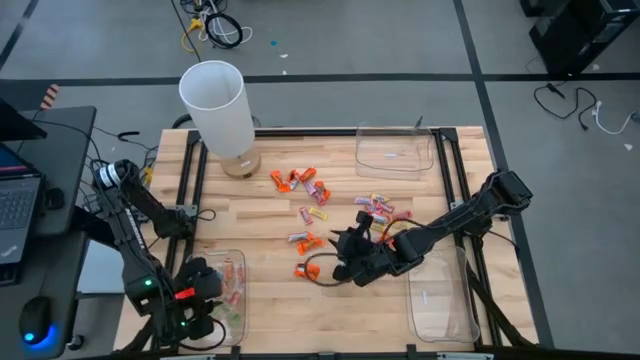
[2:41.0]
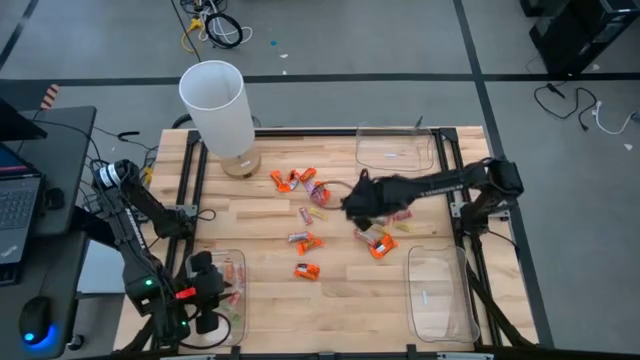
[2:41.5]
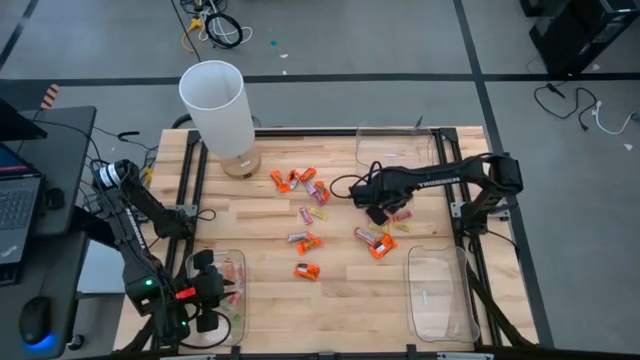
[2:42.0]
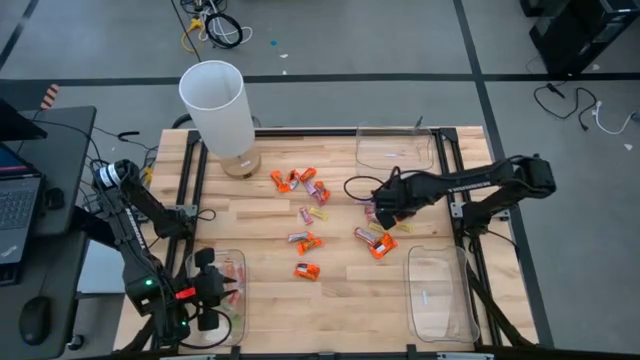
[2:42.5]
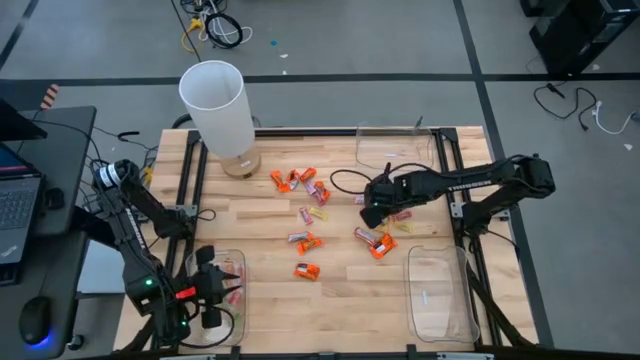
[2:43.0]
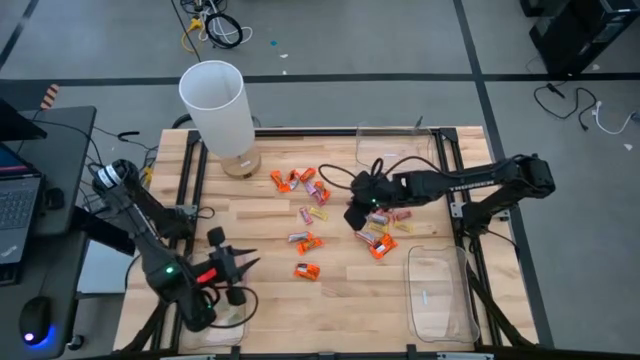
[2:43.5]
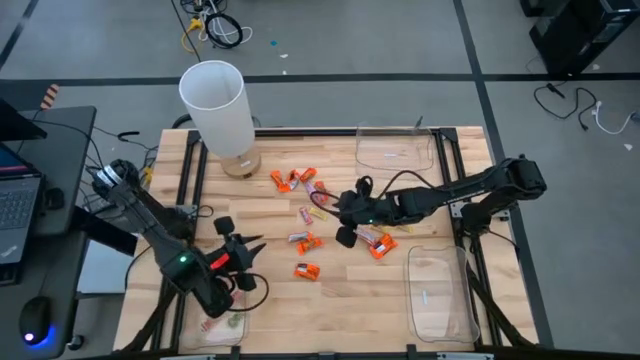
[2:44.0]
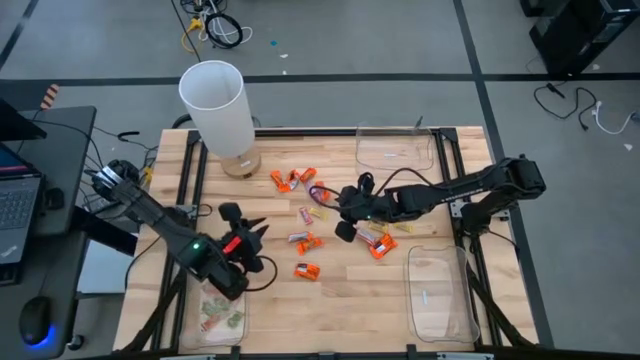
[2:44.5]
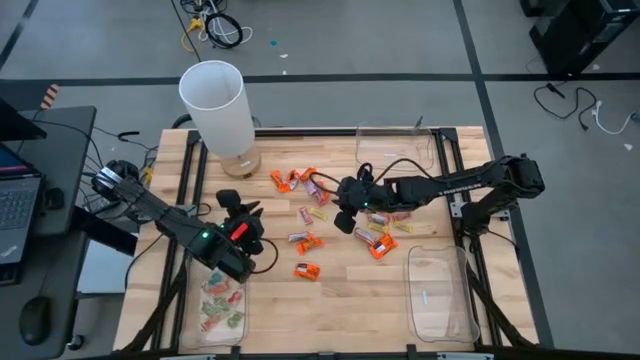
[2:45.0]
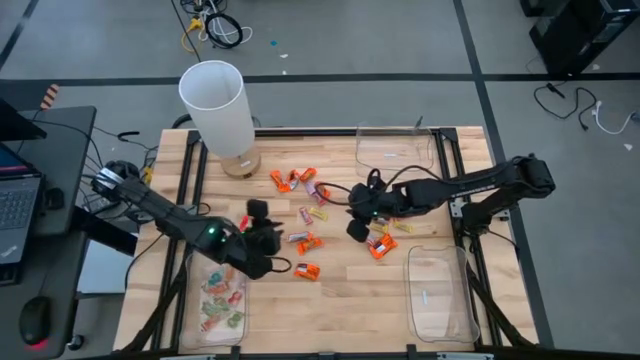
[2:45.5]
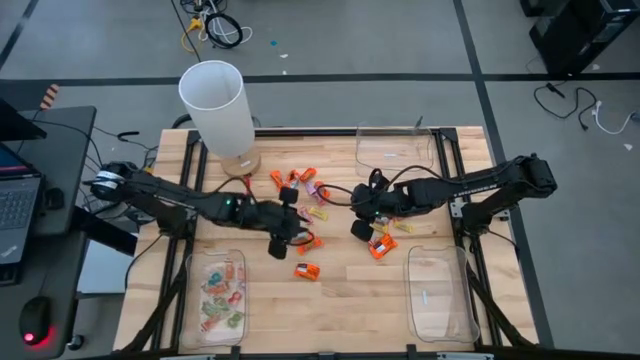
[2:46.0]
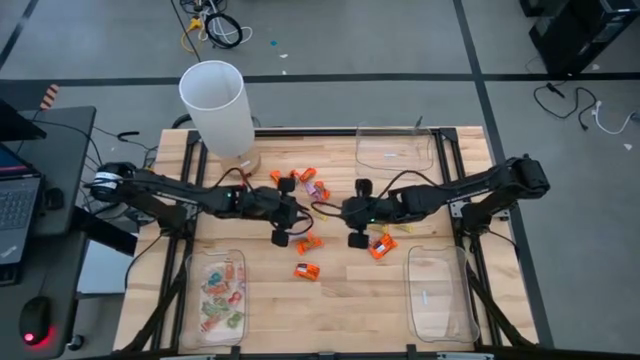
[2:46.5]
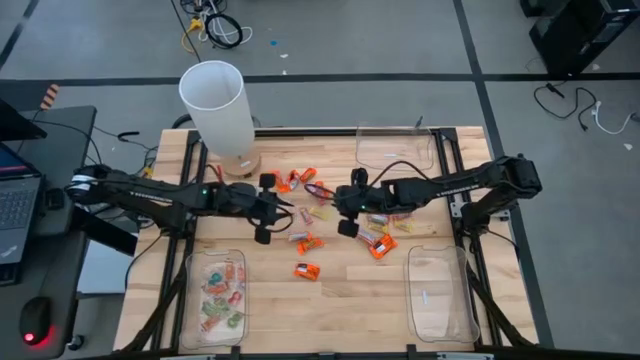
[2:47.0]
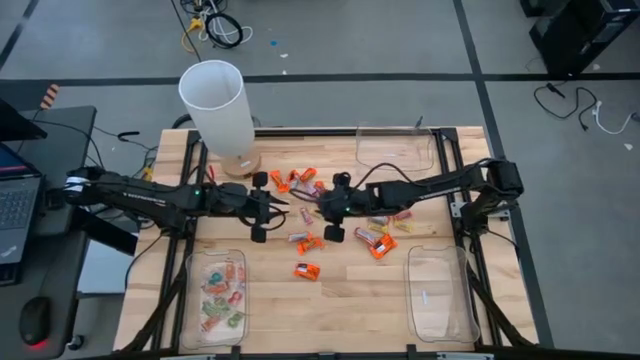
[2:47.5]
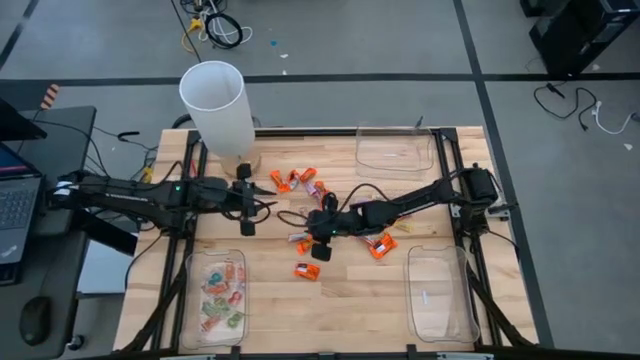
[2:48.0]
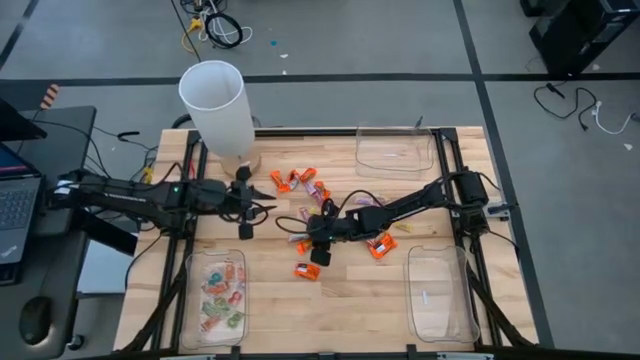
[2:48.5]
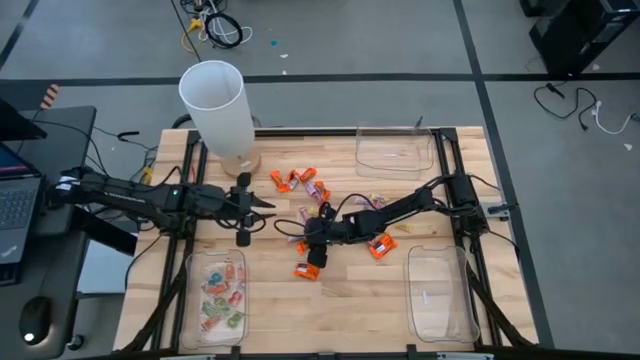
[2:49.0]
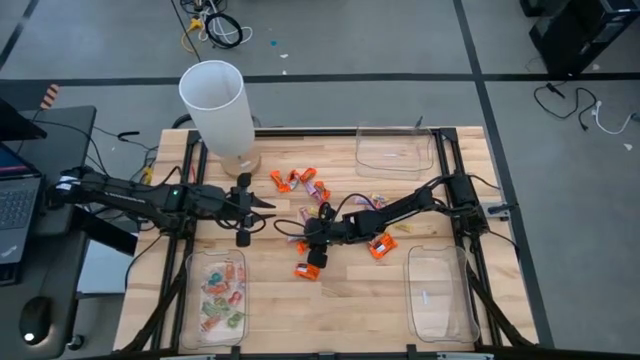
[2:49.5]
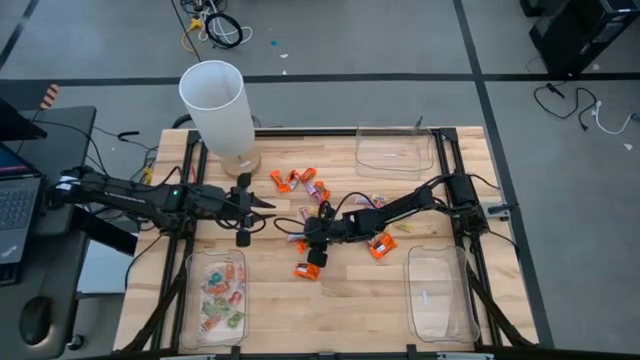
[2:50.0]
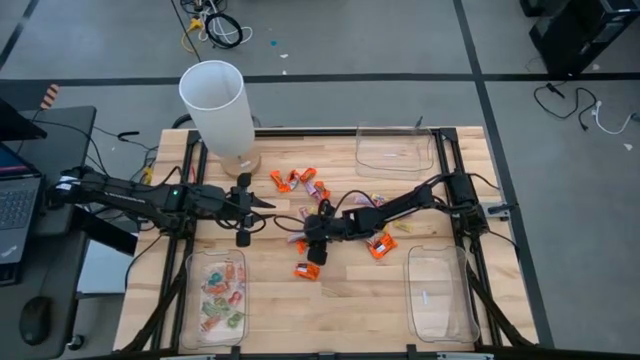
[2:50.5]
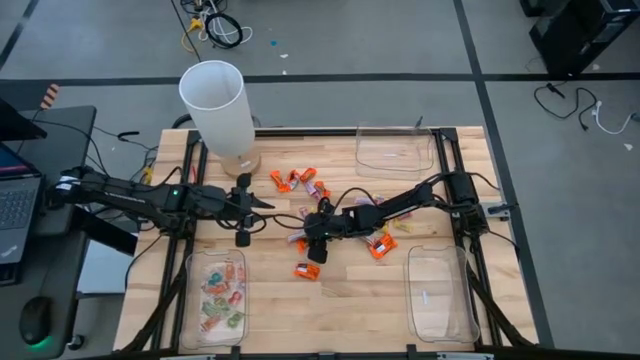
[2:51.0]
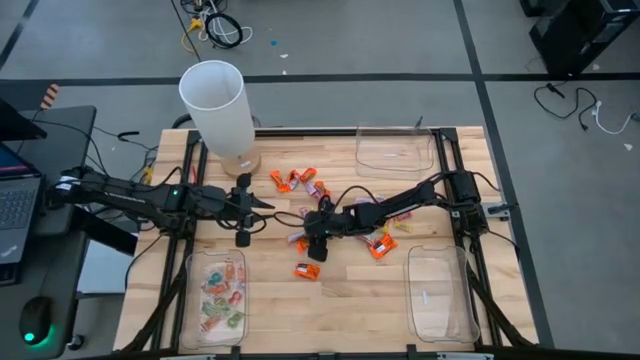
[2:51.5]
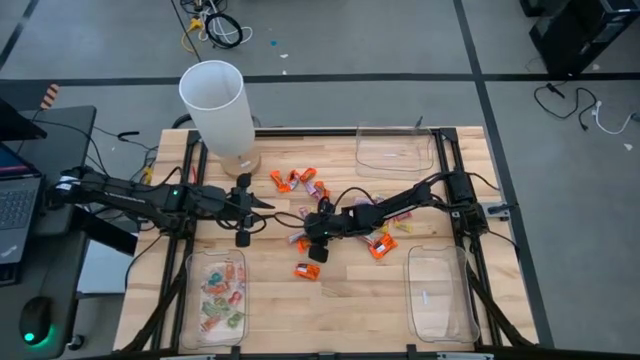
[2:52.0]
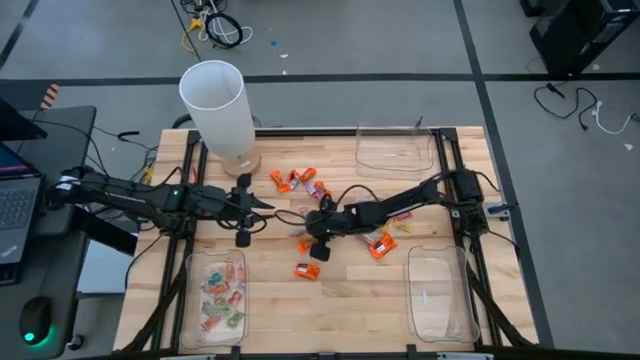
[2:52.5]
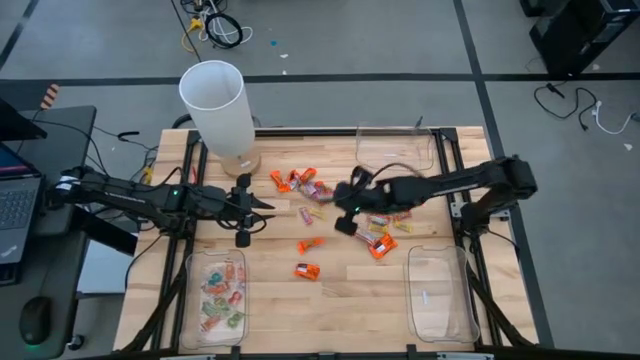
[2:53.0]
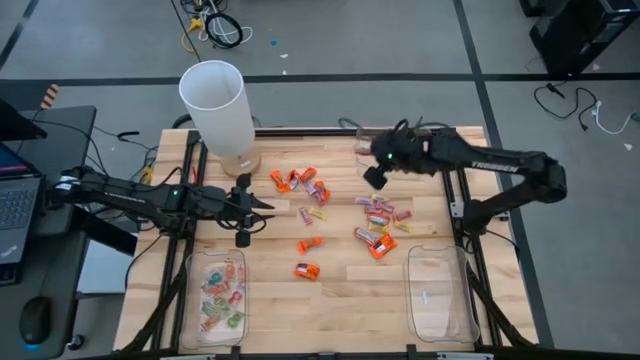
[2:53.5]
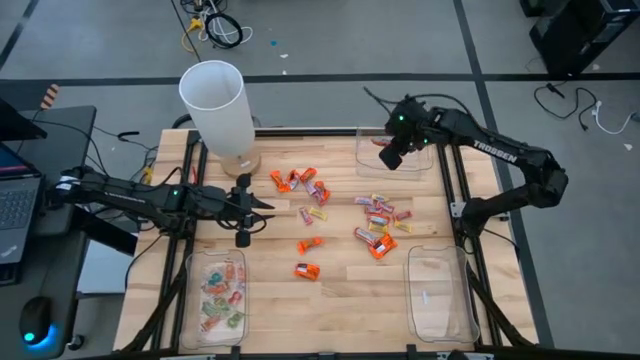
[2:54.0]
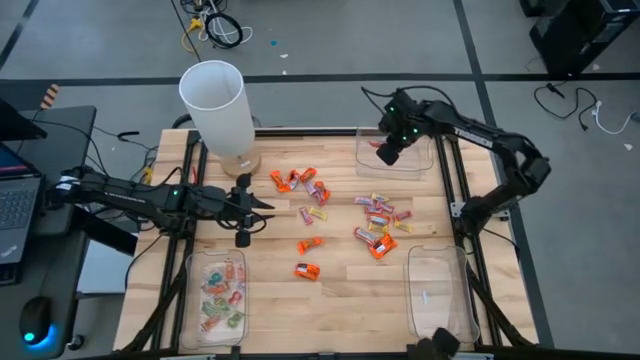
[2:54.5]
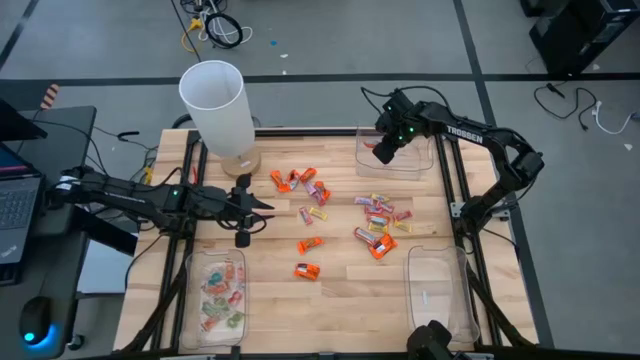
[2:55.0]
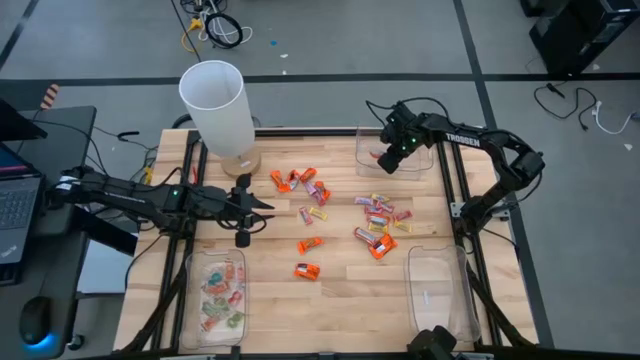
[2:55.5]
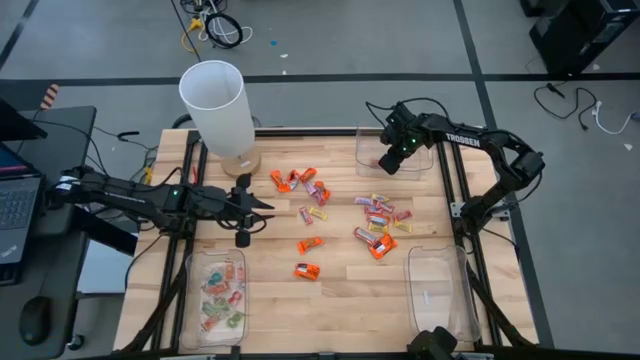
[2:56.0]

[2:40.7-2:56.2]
Task: Sort candy
Put the large orange chocolate bar into the top right transparent bin

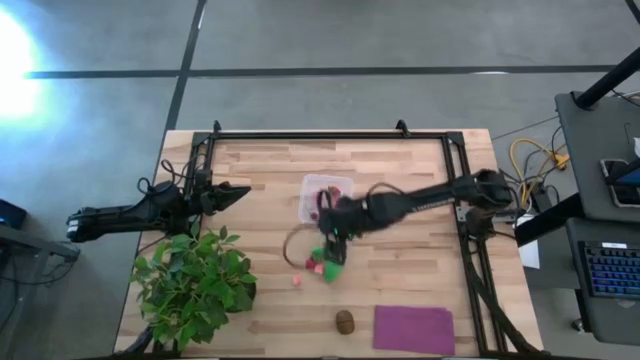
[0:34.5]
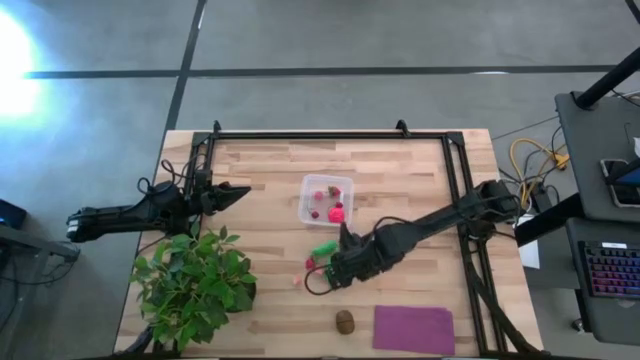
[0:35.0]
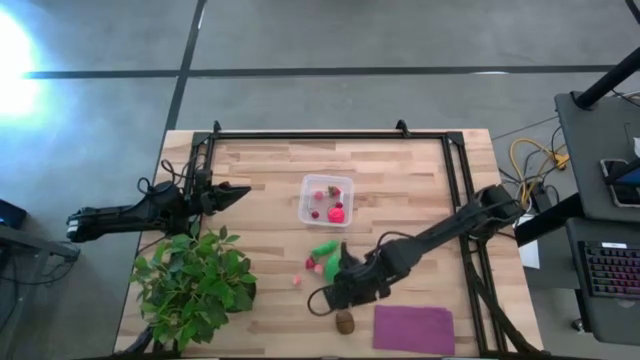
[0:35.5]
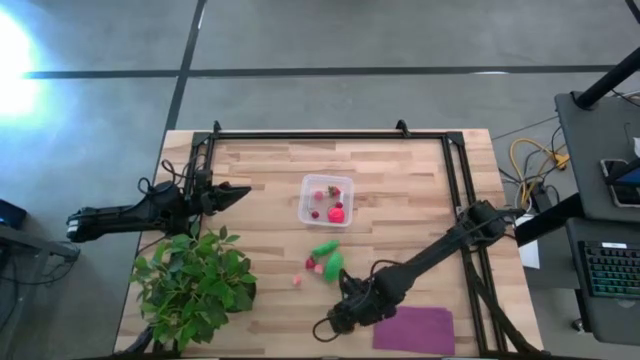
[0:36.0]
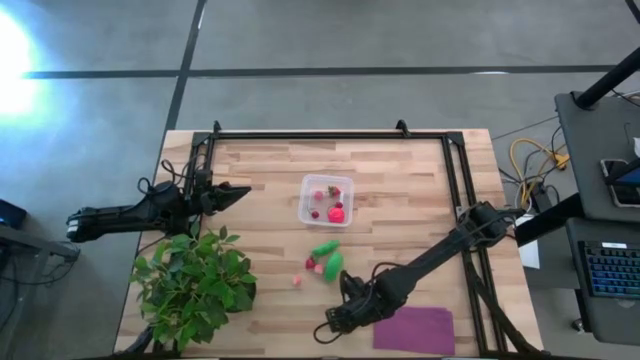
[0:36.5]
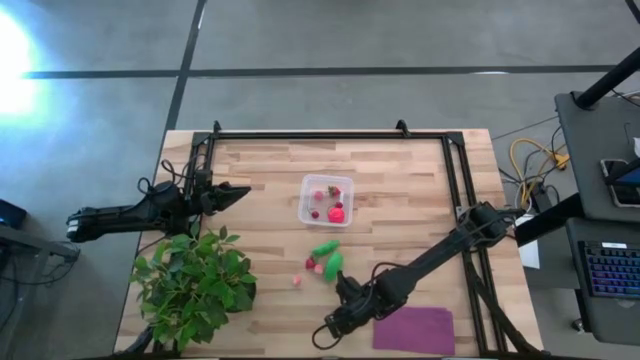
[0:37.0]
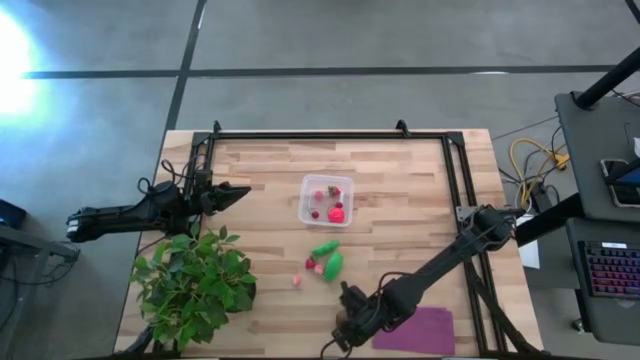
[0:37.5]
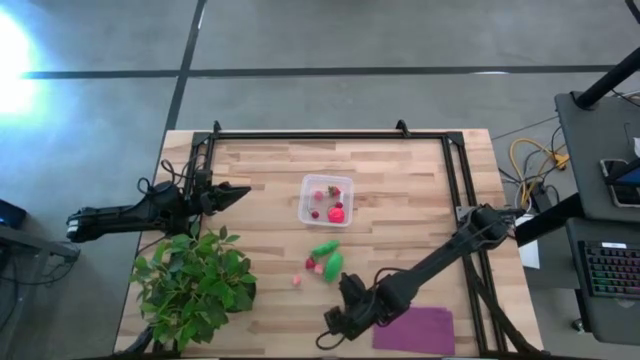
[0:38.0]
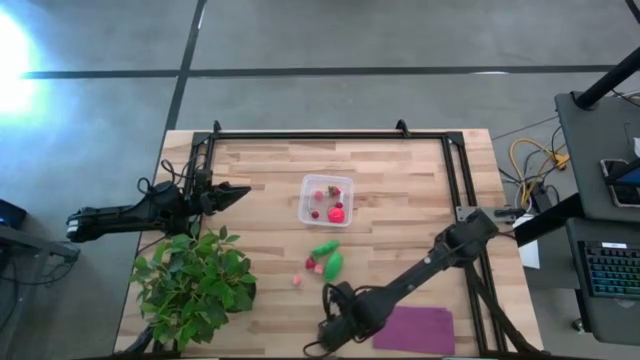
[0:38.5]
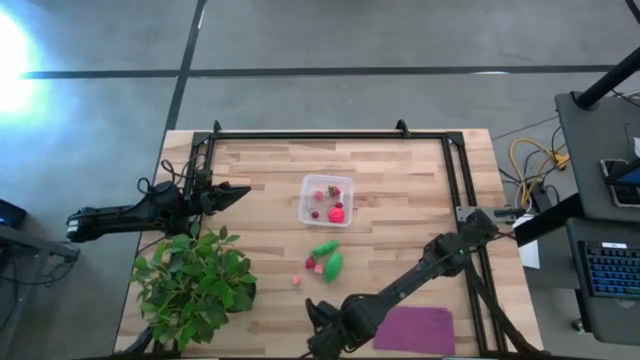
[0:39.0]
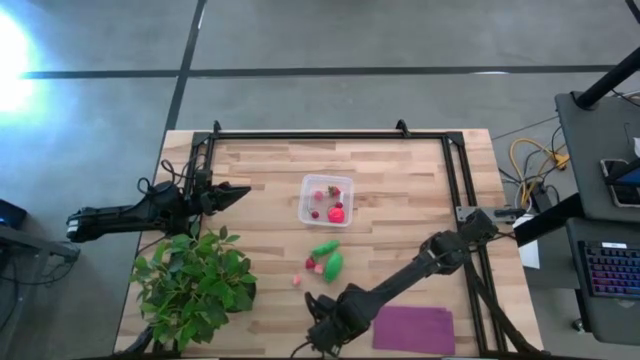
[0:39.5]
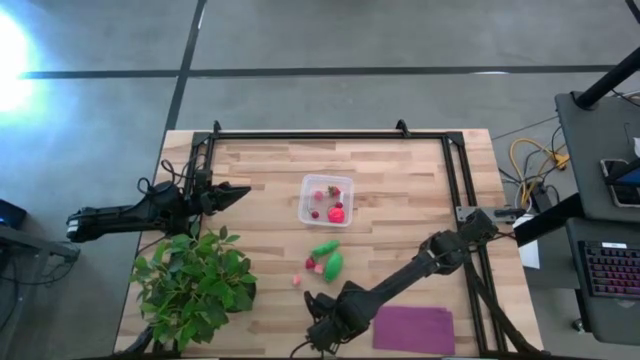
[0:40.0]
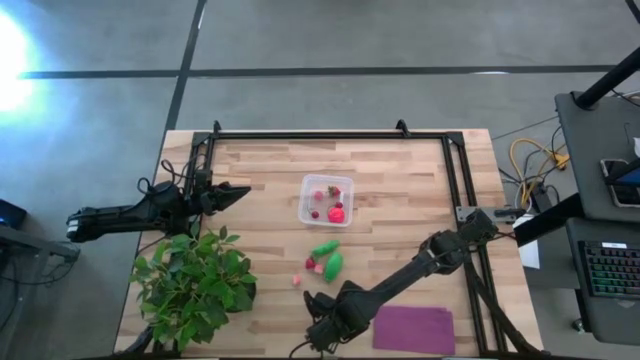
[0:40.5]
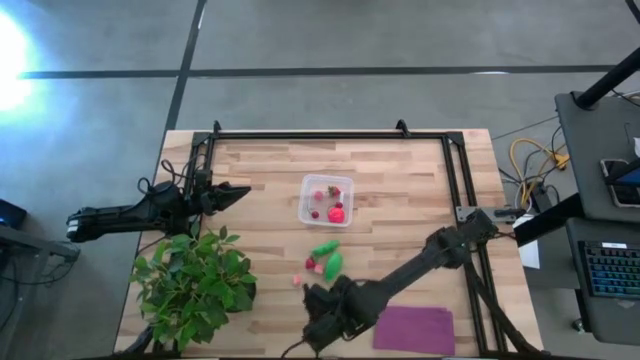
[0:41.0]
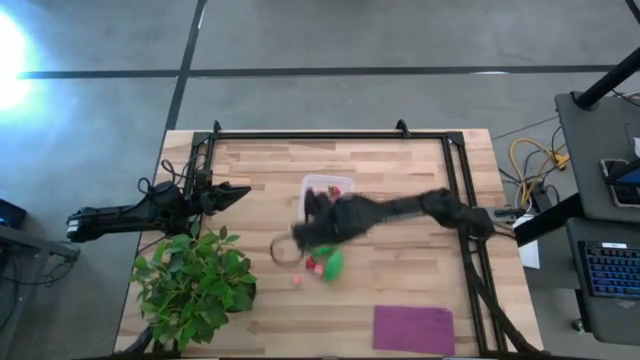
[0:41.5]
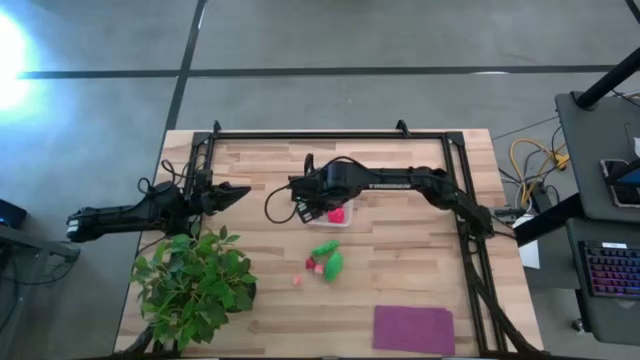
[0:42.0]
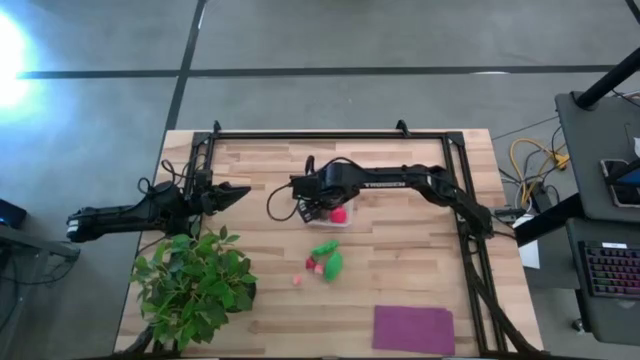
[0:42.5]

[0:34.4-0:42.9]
Task: Pick and placing Produce into tupperware
Put the brown kiwi into the transparent bin
